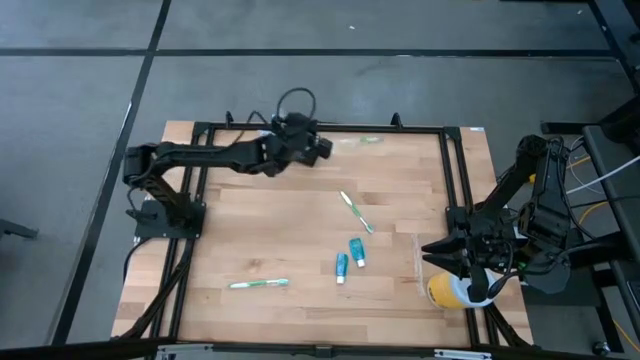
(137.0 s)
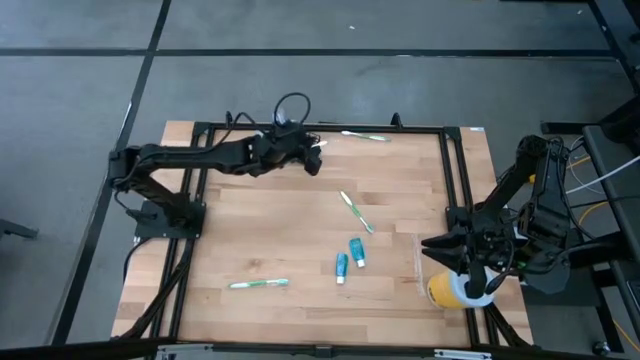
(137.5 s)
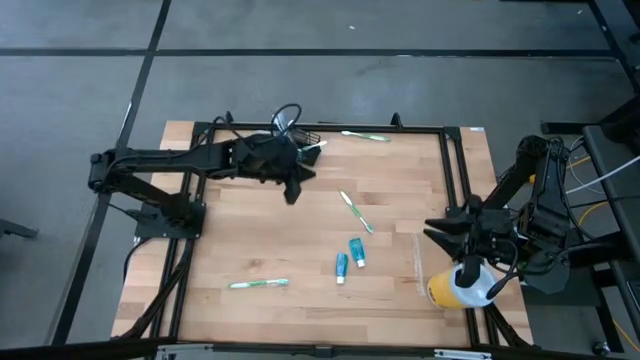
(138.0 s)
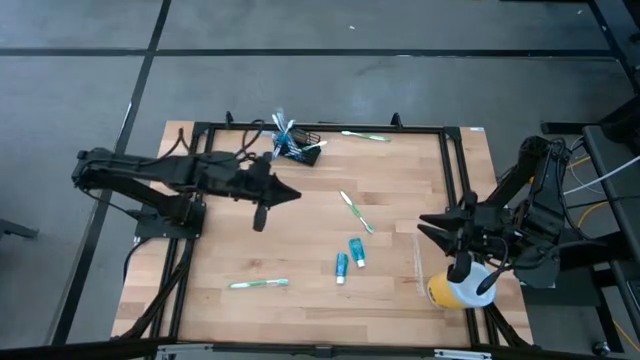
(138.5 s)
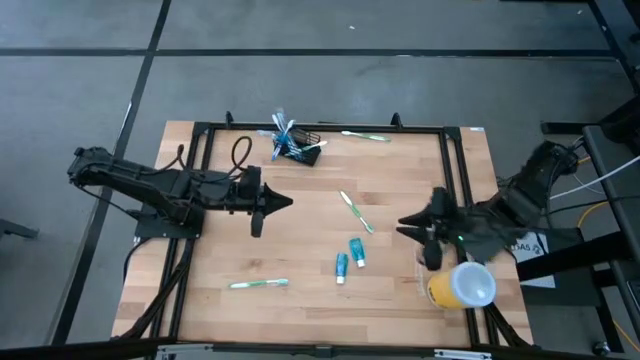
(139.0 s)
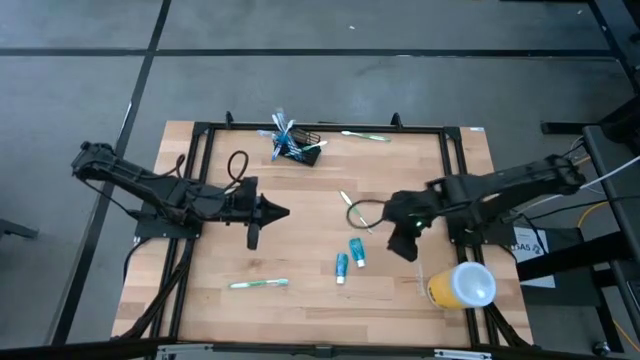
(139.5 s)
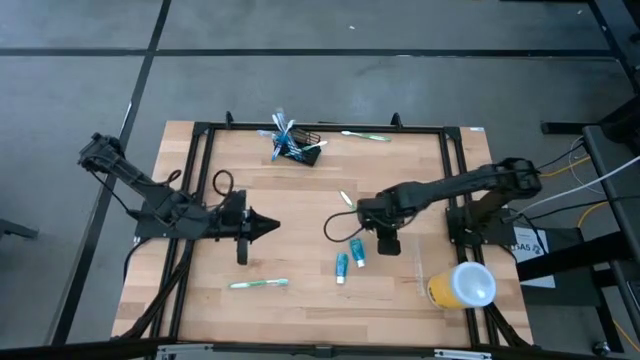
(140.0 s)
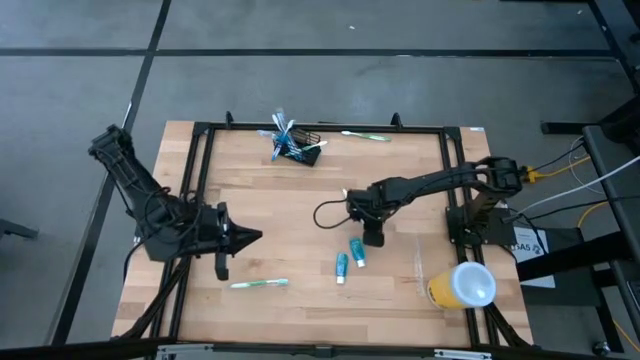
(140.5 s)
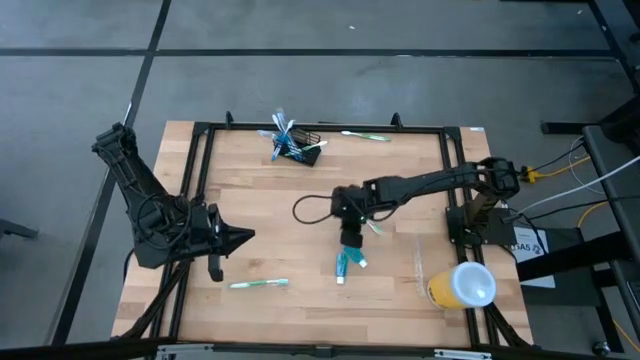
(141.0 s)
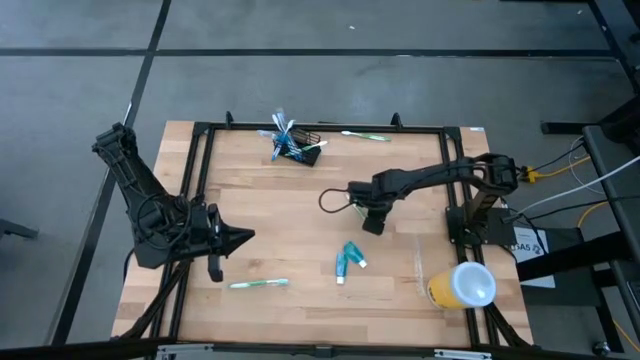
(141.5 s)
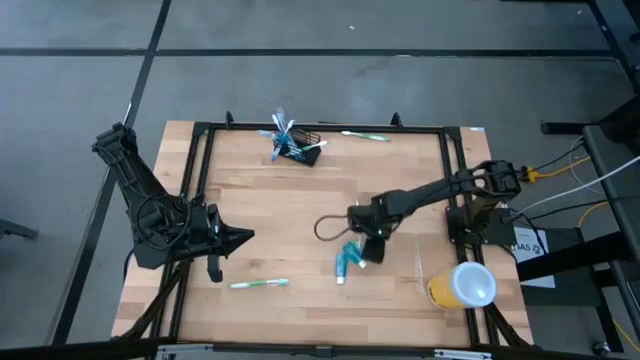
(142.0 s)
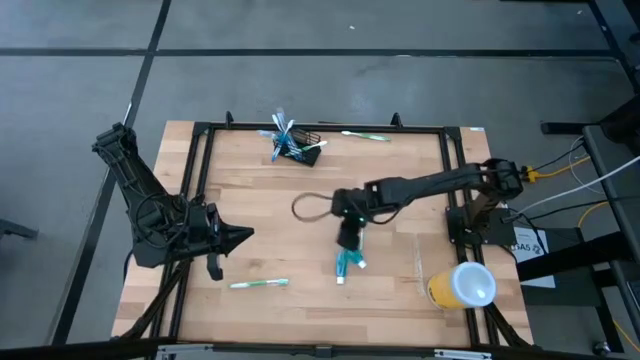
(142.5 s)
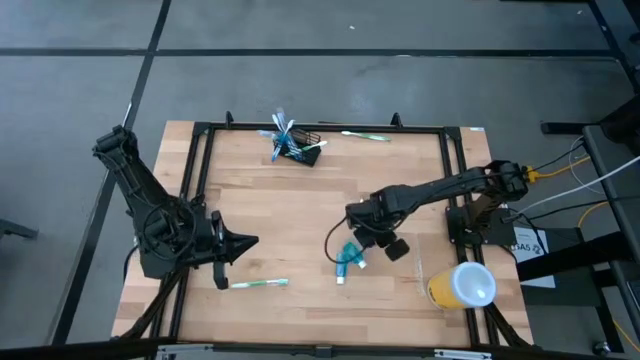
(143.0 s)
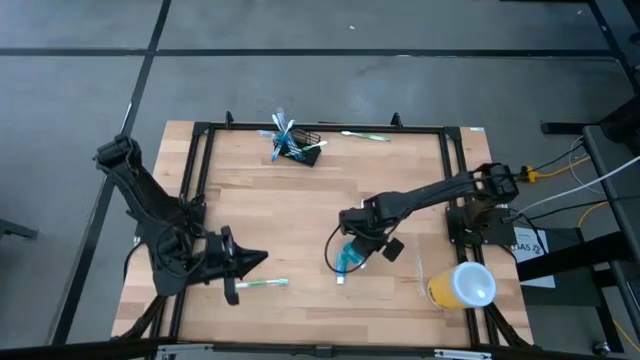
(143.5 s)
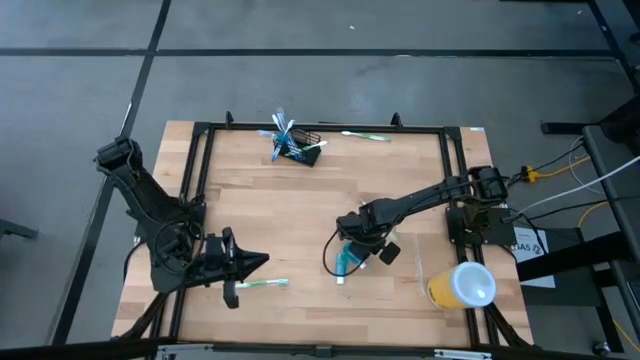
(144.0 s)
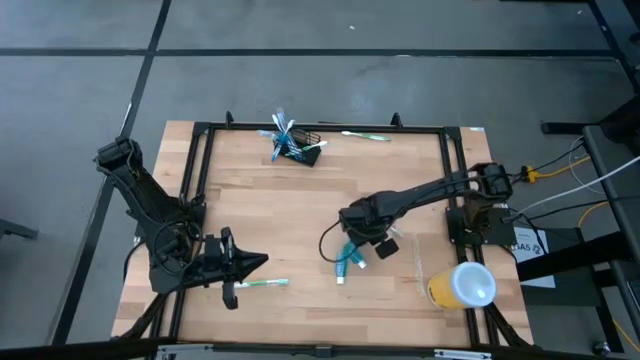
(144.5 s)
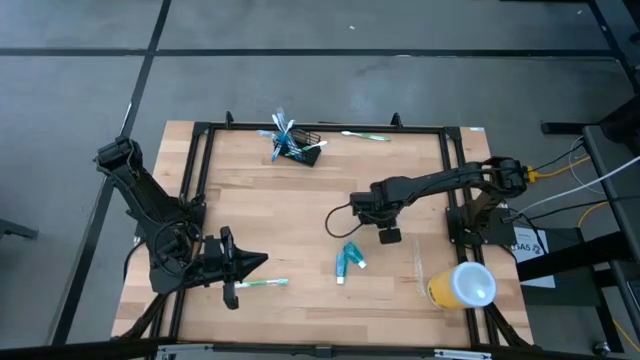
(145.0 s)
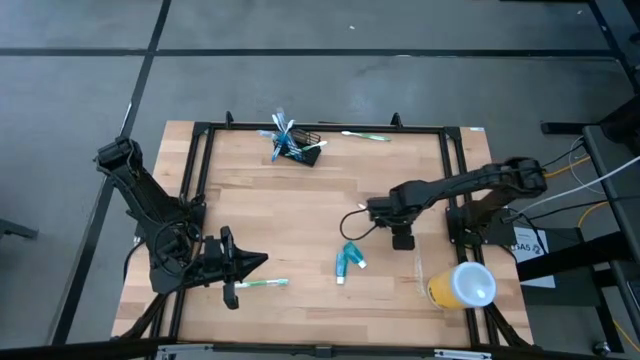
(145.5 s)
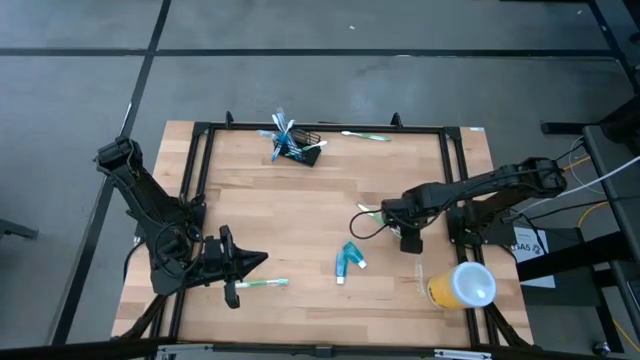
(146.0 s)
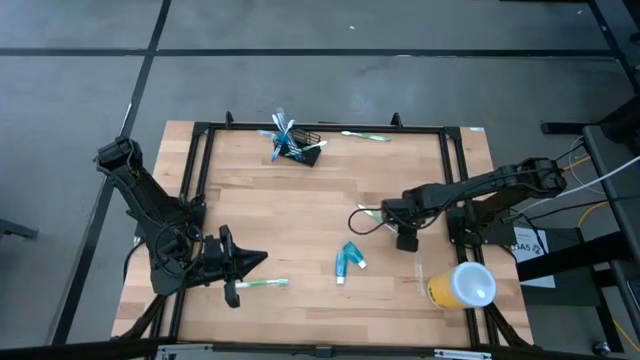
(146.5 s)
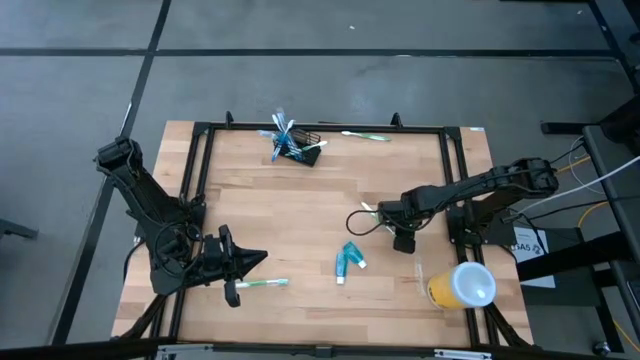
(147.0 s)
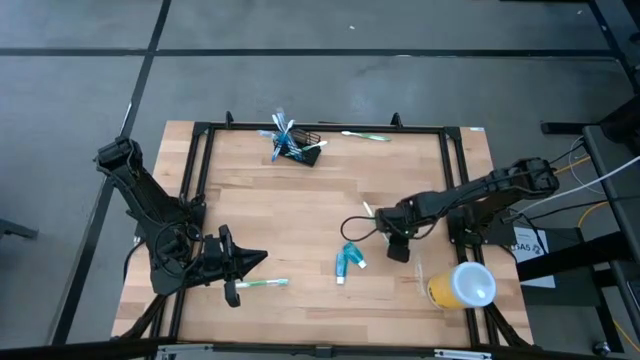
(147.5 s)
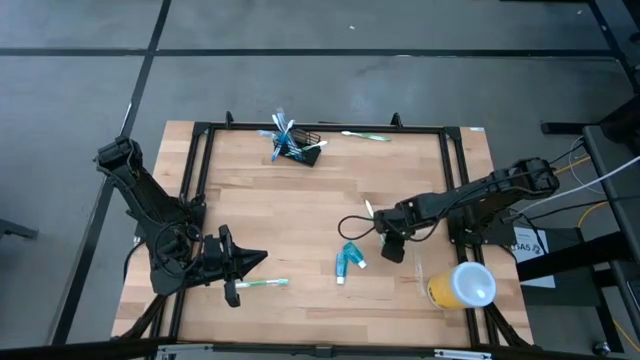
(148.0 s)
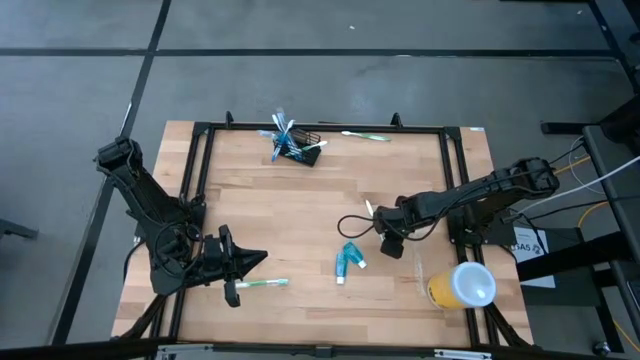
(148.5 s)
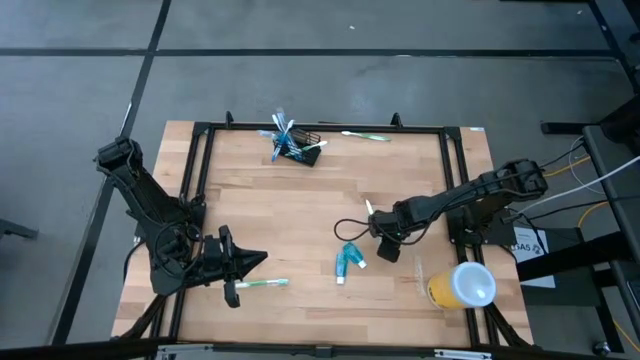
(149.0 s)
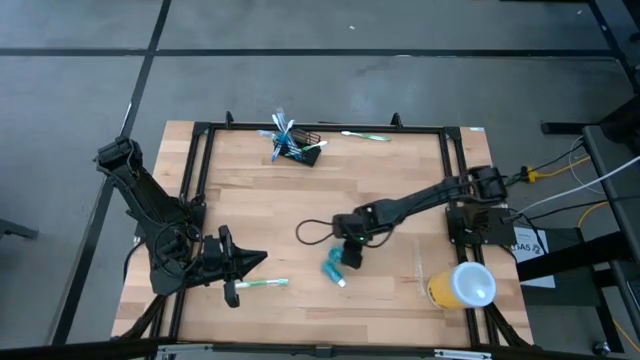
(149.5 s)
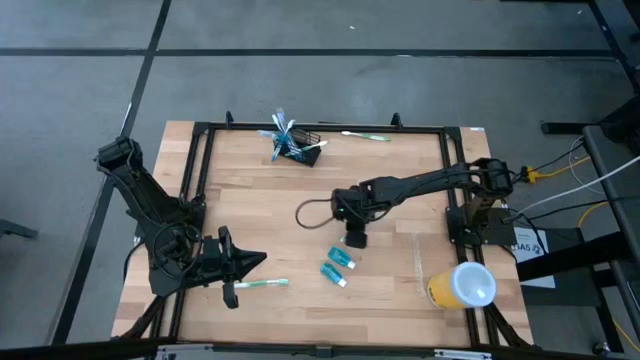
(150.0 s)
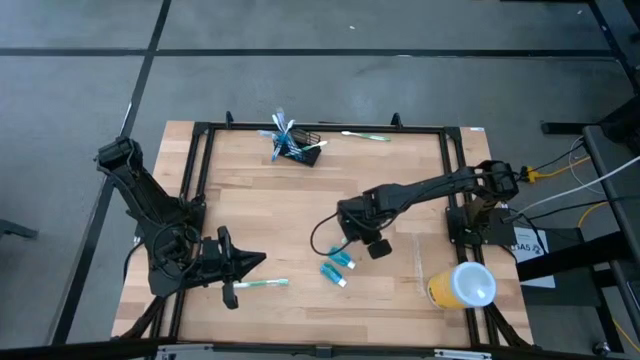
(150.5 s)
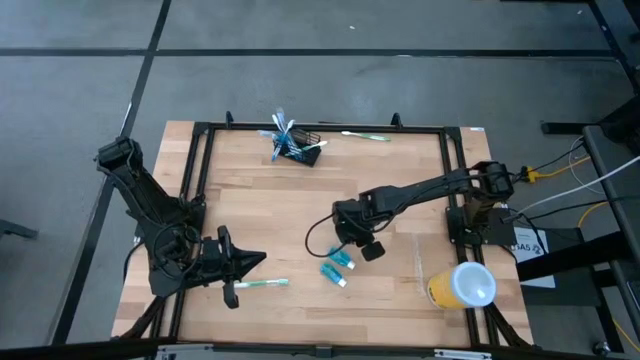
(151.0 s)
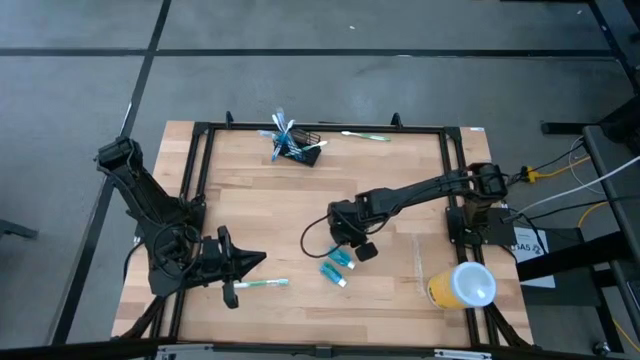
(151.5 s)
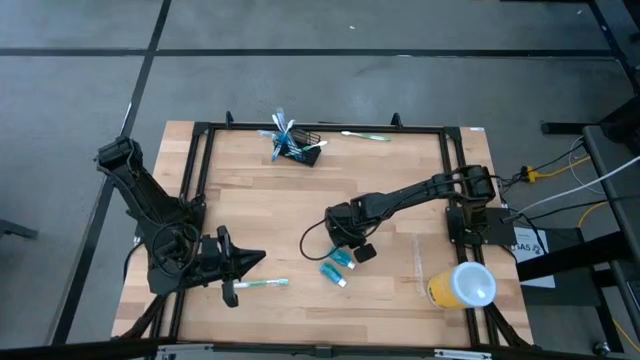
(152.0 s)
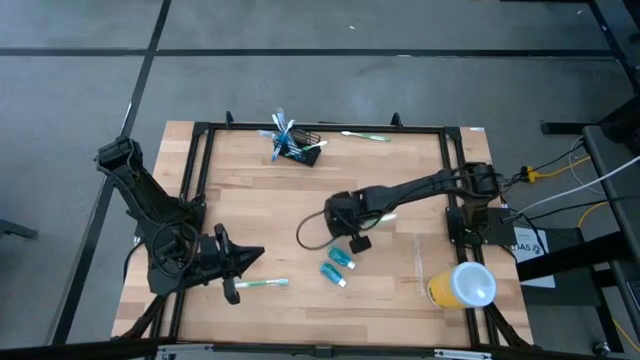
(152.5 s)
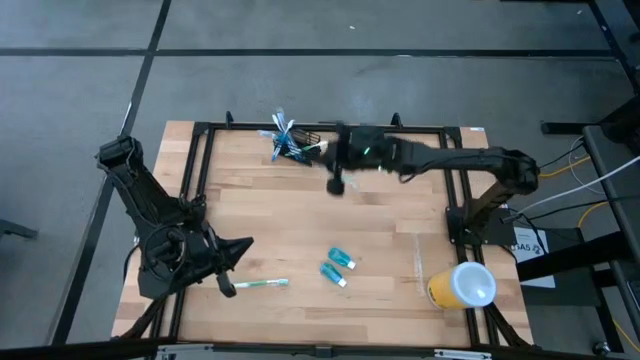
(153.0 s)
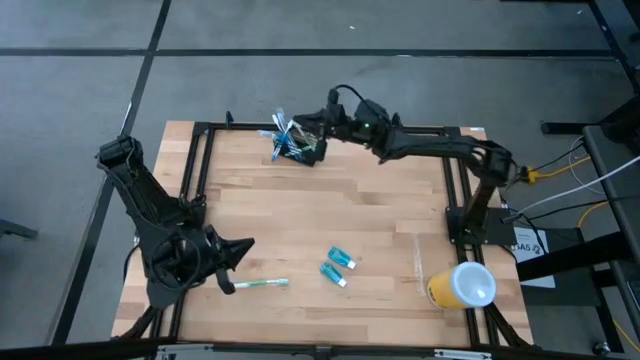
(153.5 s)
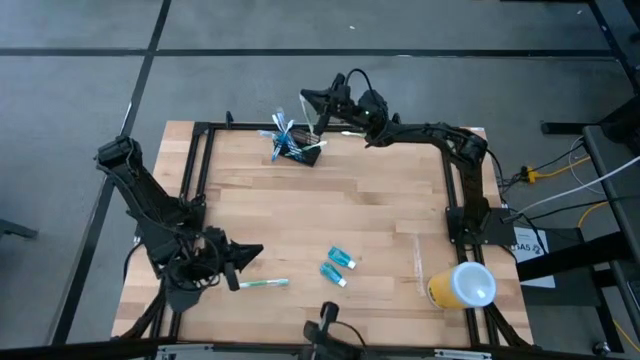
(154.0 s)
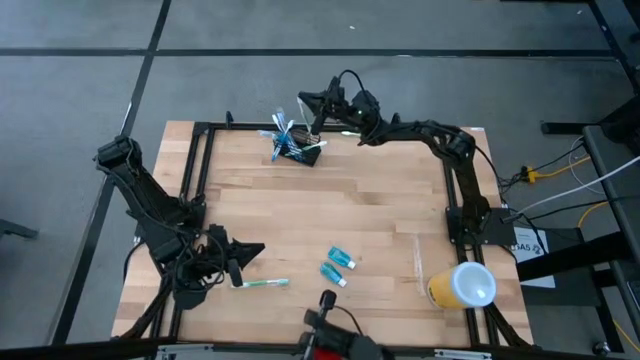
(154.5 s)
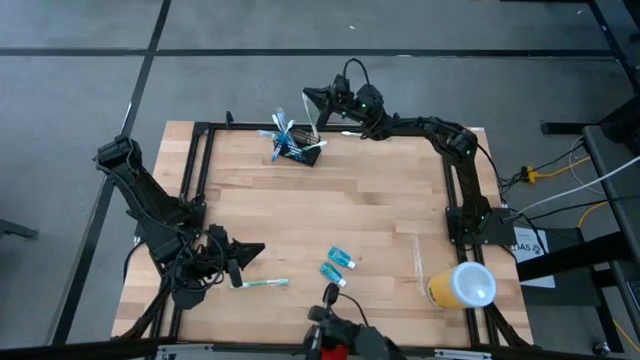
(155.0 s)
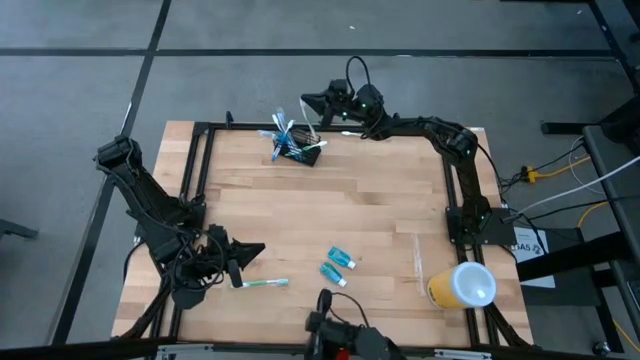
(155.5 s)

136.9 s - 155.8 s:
Task: Pick & Place toothbrushing station
Put the green toothbrush into the wire organizer
